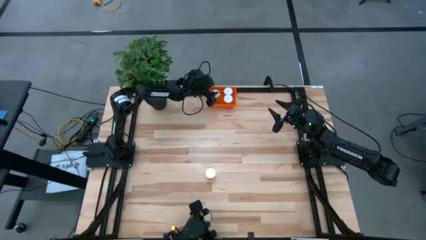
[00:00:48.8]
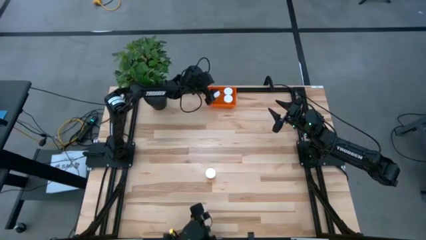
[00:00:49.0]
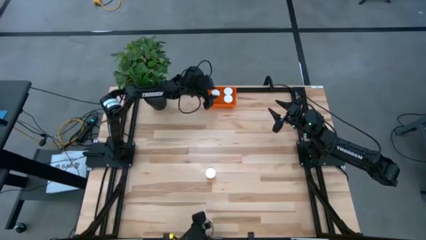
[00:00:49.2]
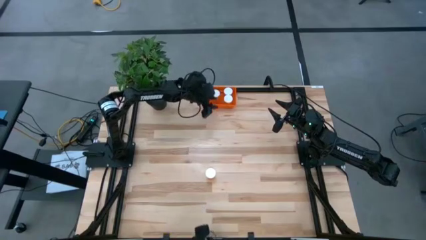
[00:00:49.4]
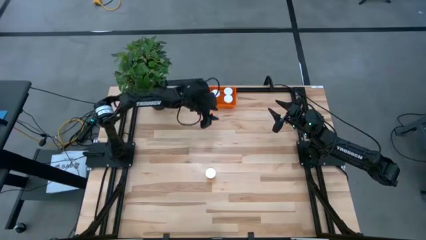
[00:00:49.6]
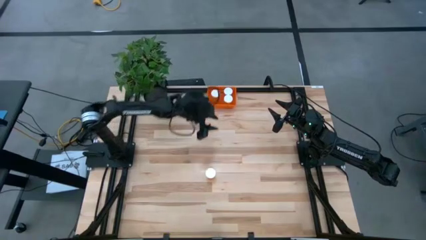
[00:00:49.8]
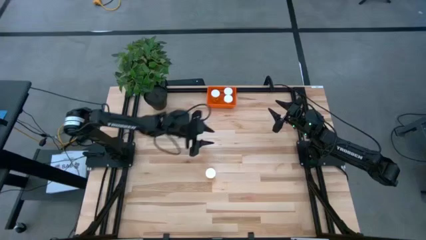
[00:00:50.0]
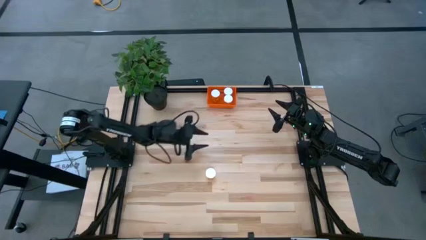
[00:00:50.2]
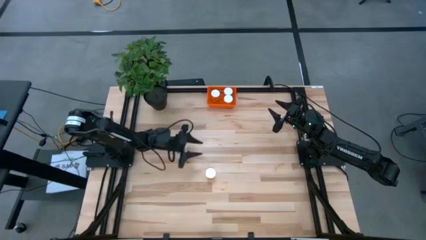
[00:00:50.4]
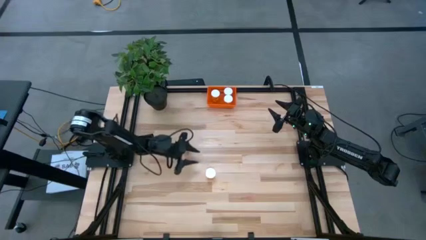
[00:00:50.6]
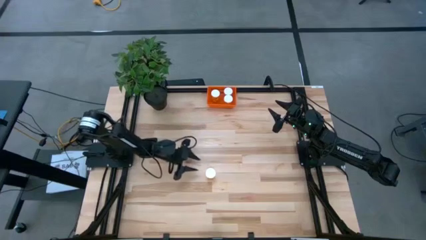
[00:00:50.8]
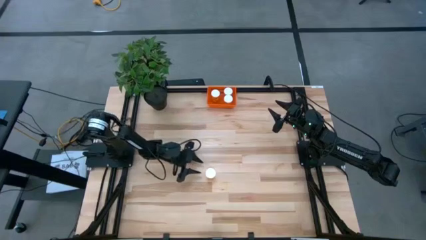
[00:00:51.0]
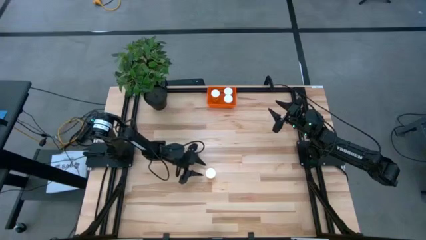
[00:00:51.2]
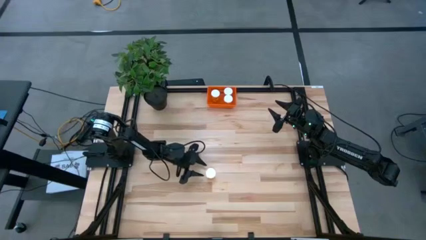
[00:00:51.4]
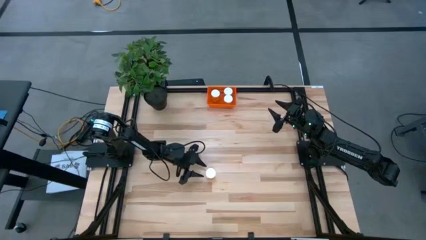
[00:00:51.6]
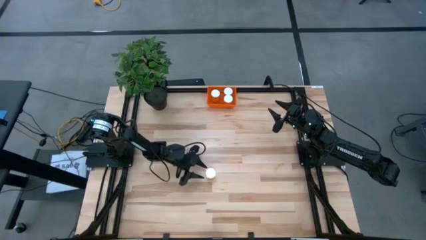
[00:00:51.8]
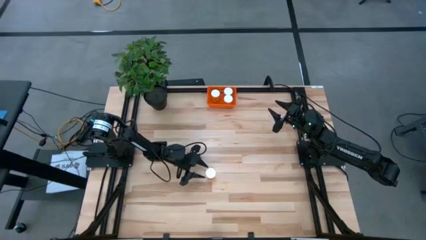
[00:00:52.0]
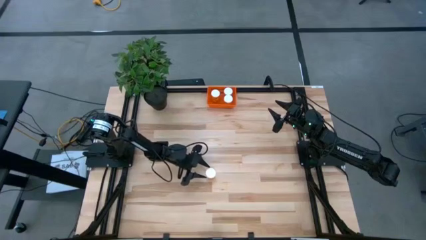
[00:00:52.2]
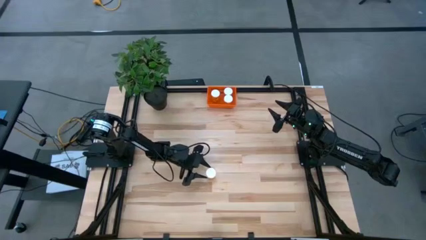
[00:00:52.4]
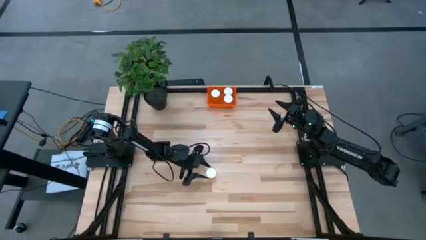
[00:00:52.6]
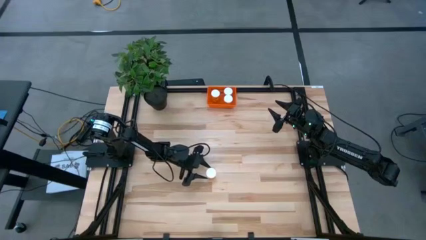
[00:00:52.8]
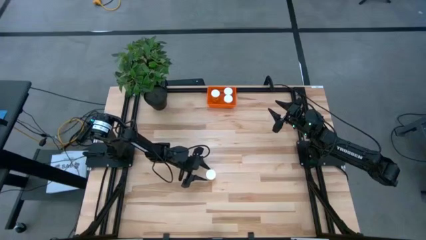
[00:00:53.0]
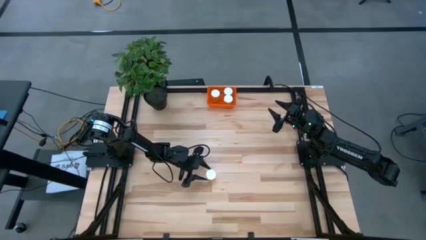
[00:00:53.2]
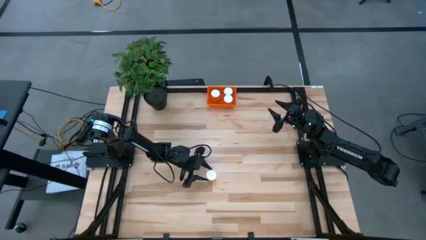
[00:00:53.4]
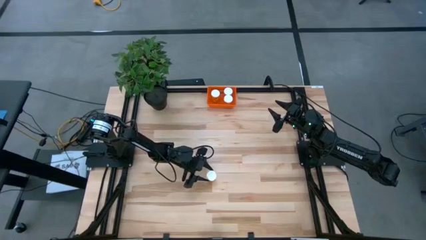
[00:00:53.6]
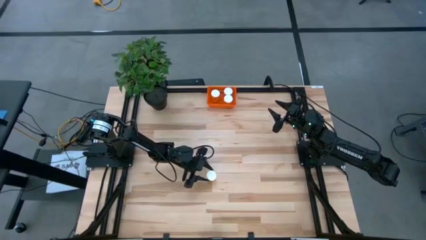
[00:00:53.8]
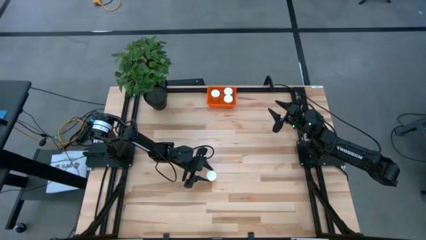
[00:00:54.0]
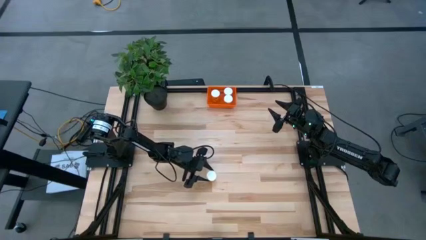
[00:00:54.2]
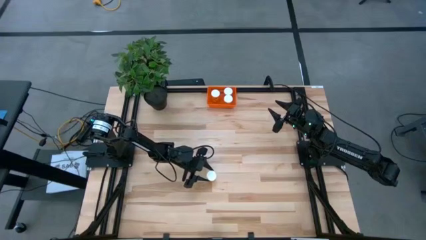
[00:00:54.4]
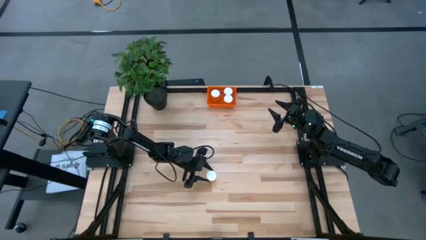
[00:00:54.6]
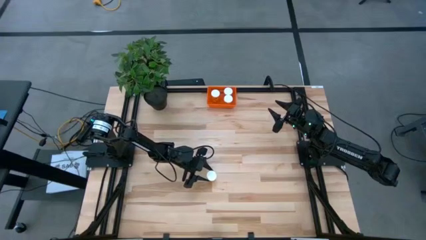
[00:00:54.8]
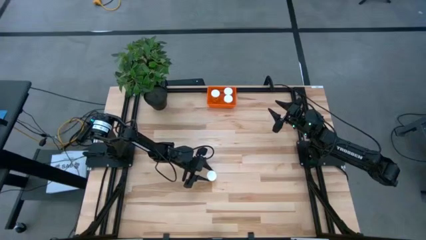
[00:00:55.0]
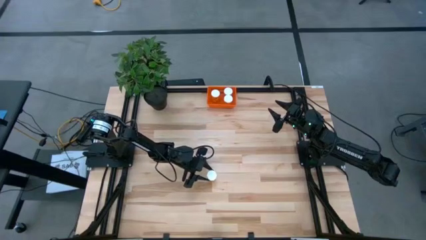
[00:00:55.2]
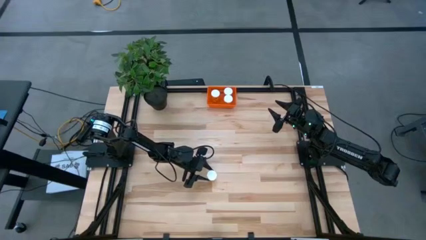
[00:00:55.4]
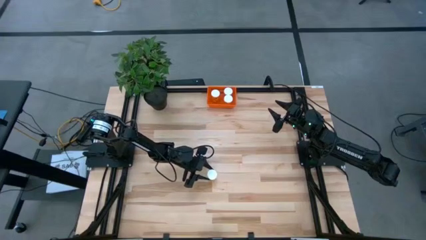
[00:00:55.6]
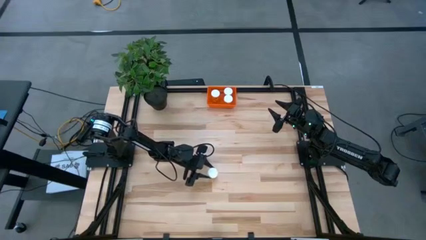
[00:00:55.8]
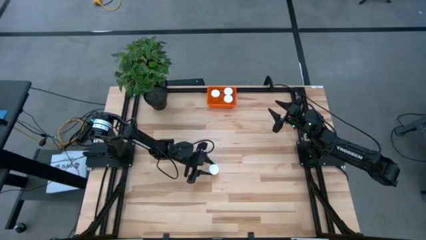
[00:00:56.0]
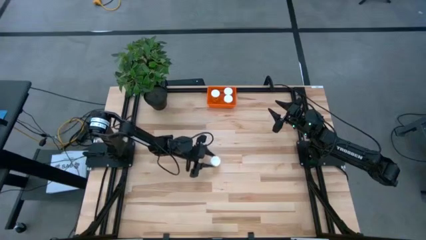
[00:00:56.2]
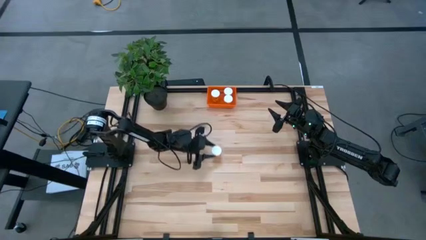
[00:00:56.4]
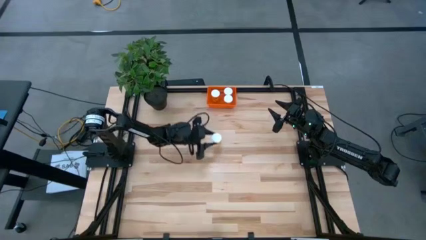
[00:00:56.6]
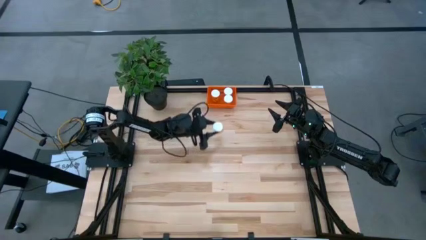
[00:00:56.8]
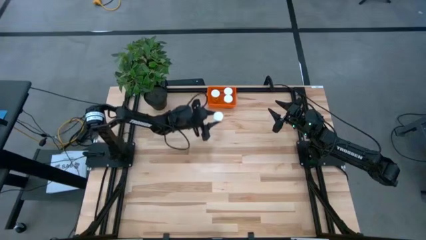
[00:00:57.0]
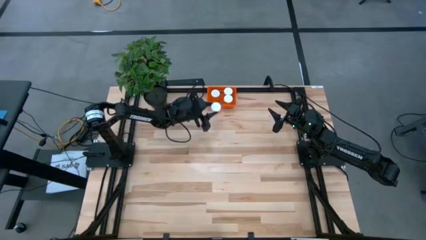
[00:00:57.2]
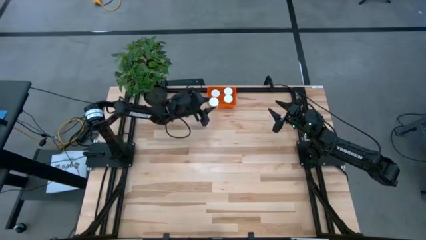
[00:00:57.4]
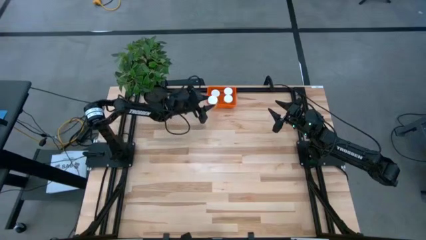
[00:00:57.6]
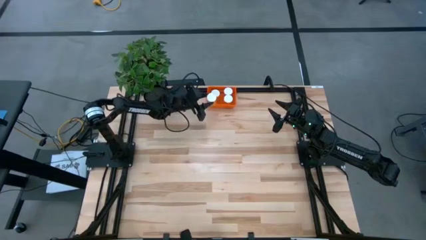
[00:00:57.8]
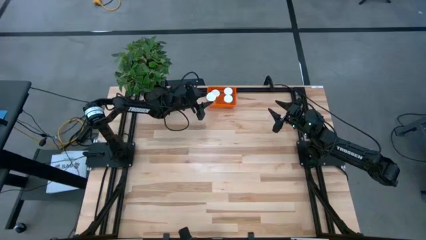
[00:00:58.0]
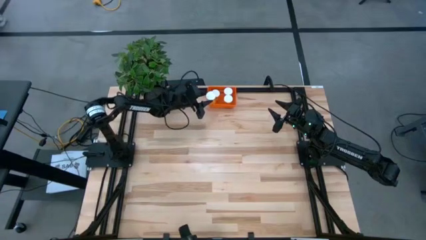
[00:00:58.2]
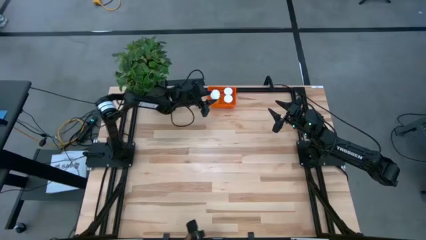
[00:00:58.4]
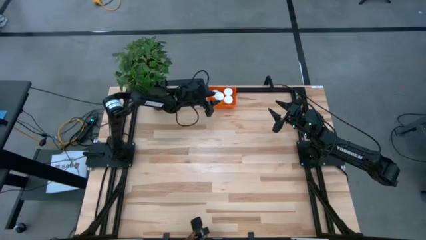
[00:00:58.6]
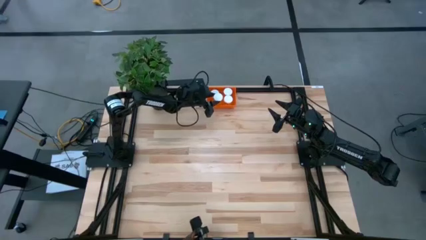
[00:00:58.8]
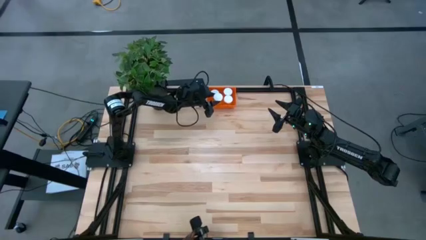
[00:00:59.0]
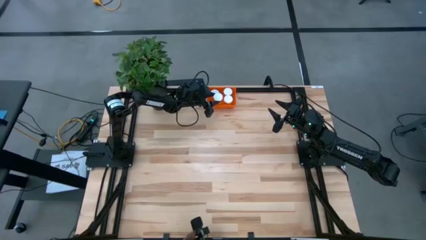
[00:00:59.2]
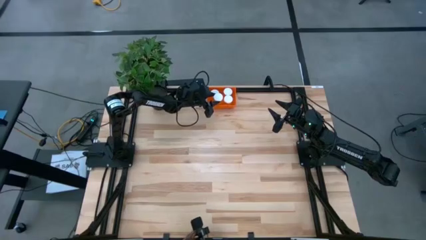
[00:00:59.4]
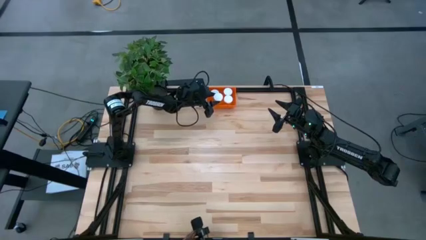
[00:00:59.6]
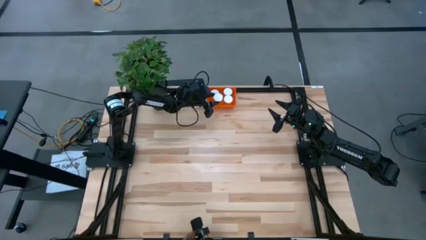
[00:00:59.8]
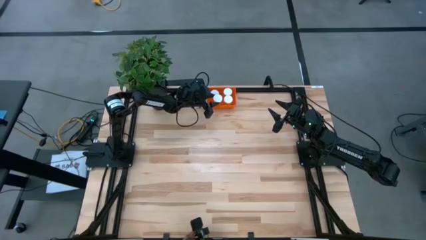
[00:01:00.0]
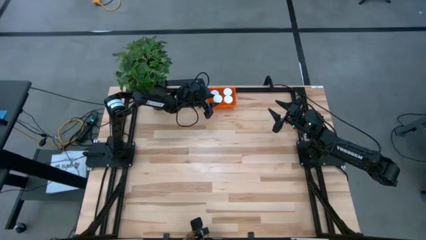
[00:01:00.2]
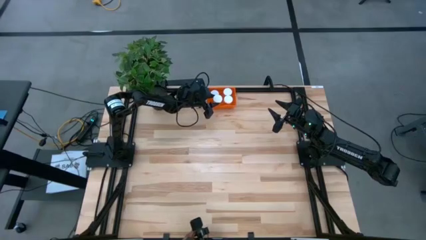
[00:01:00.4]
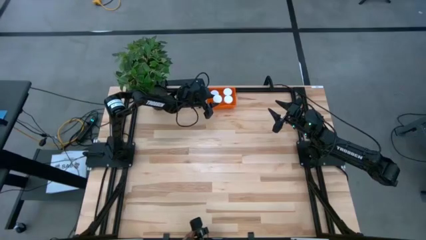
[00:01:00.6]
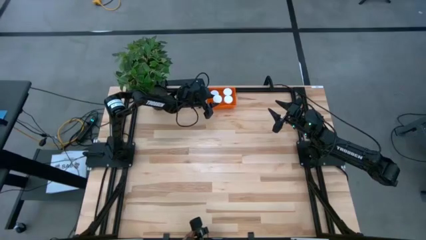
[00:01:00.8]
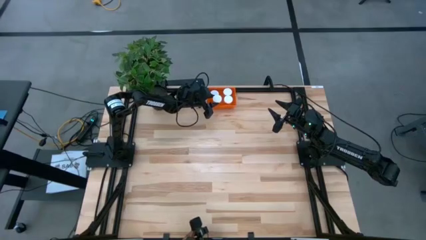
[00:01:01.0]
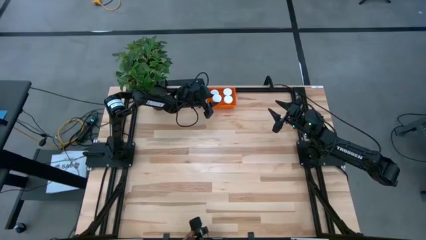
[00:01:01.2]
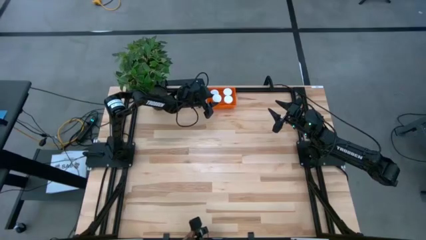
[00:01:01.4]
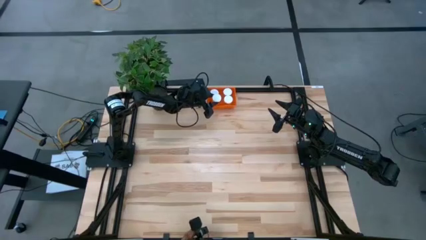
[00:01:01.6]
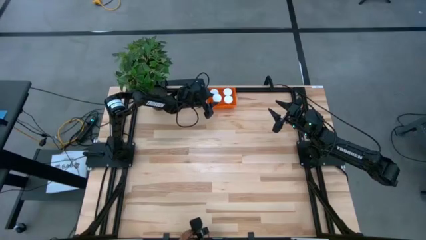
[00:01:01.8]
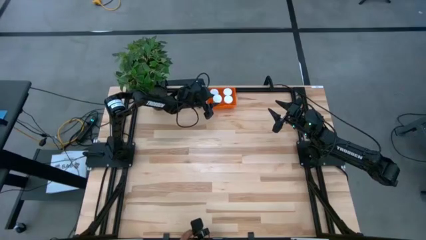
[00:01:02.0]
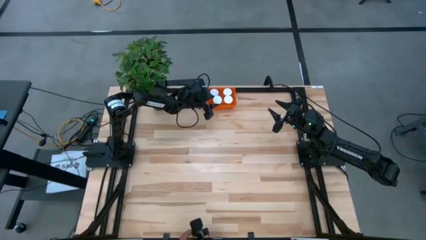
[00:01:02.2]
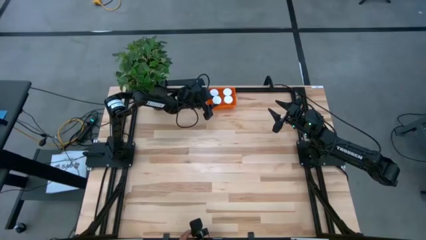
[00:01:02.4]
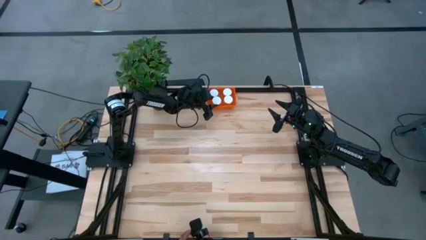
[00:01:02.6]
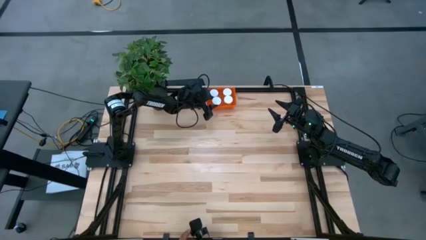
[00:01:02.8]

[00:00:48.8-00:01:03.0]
Task: Pick and place pill bottles into a basket
Put the orange pill bottle into the orange bin

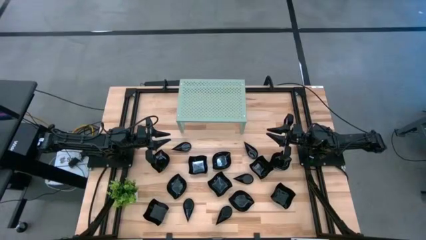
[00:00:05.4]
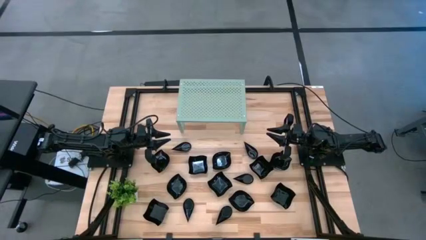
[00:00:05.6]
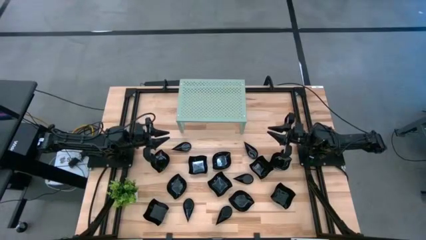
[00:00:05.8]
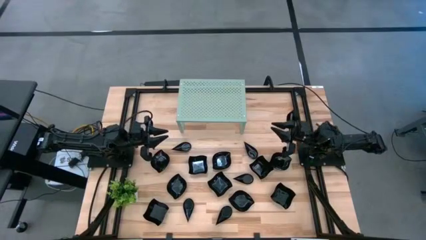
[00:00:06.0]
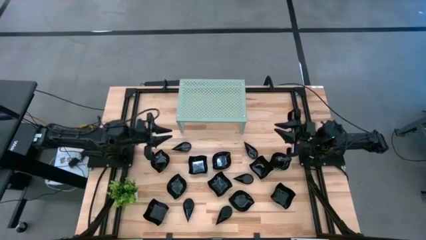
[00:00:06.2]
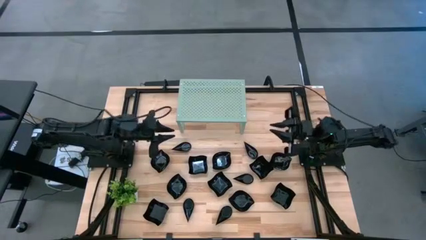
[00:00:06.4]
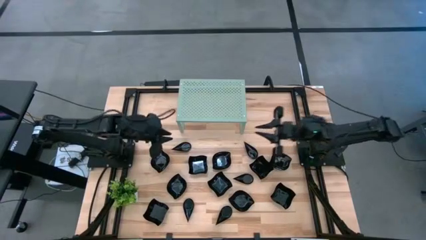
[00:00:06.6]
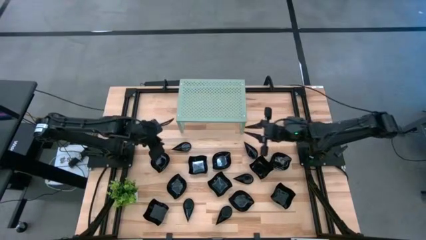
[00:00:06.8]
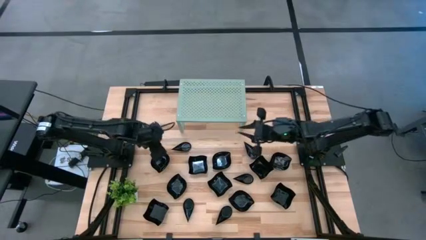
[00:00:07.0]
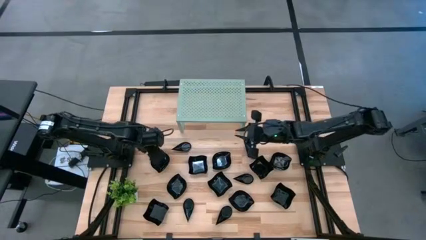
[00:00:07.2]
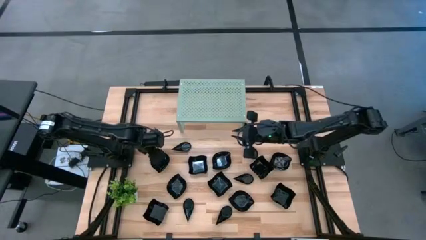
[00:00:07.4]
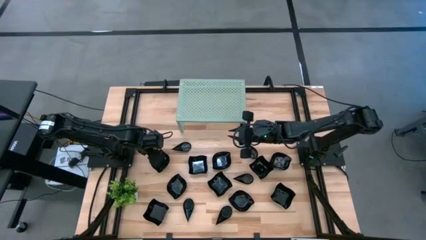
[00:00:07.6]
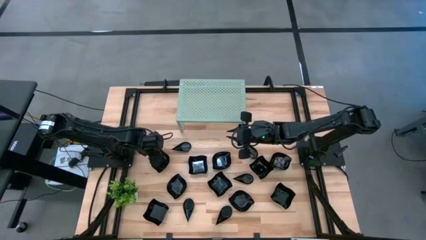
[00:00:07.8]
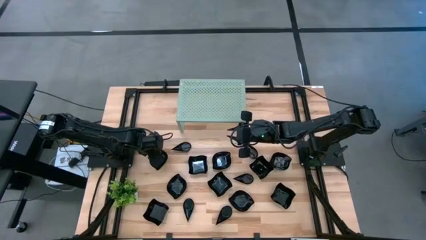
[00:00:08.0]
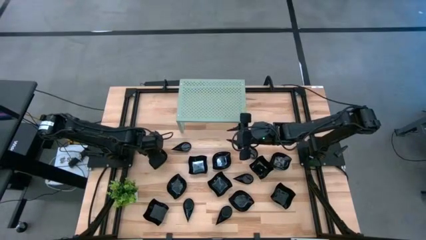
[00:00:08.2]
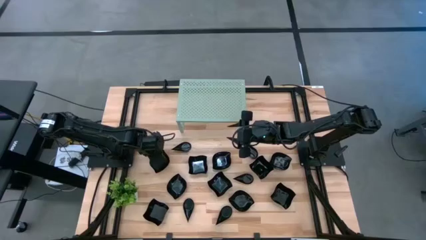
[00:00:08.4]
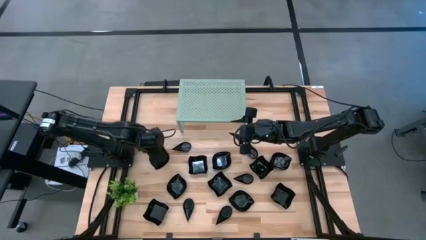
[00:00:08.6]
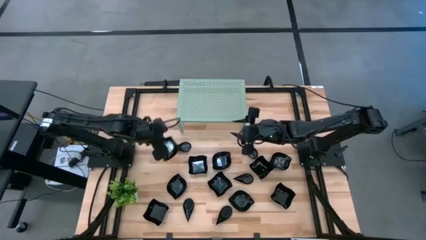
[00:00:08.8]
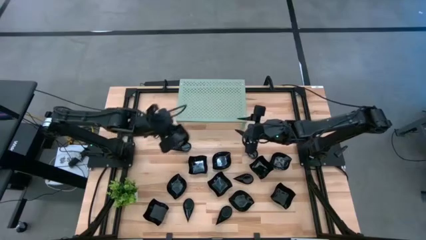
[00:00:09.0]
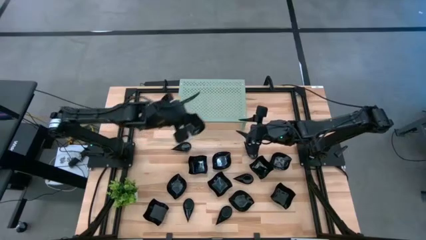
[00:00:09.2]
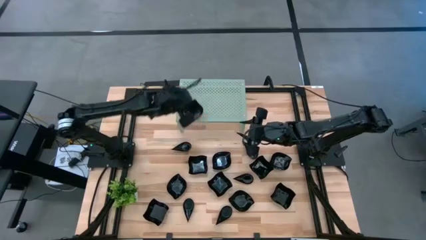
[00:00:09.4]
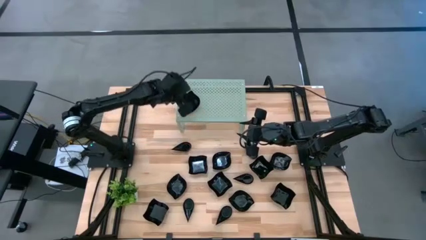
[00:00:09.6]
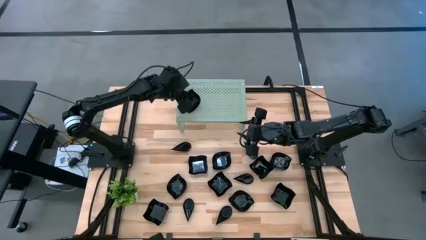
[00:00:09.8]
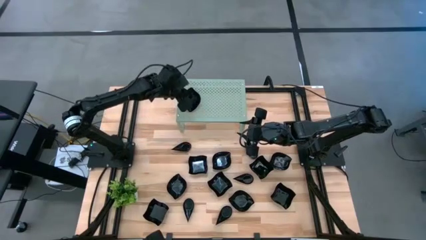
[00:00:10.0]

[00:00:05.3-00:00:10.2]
Task: Pick & Place Mini shaped plates
Put the leaf-shaped plate on the shelf
